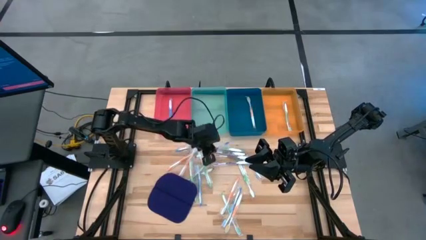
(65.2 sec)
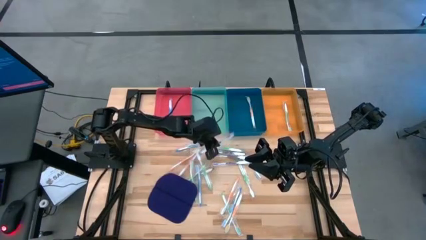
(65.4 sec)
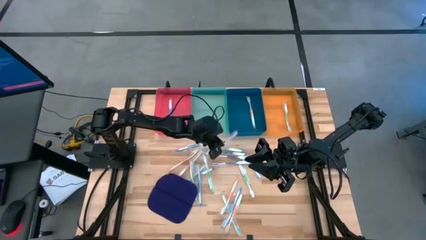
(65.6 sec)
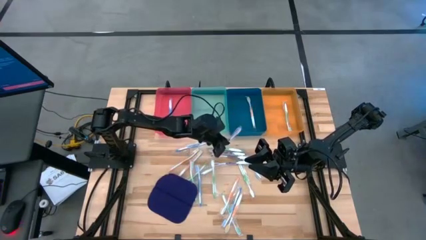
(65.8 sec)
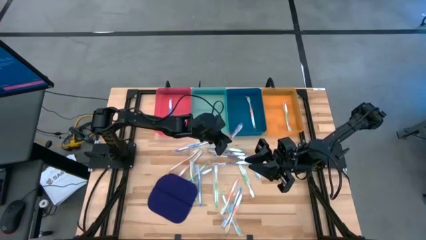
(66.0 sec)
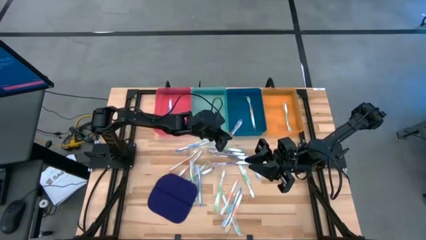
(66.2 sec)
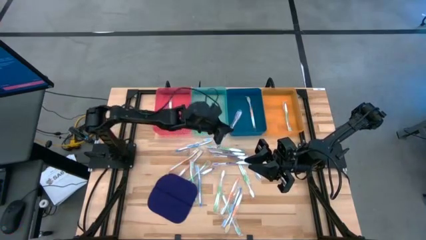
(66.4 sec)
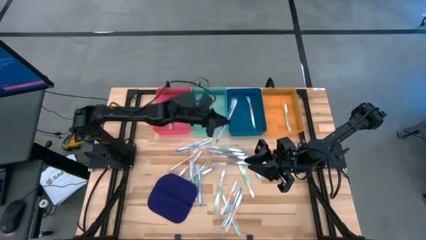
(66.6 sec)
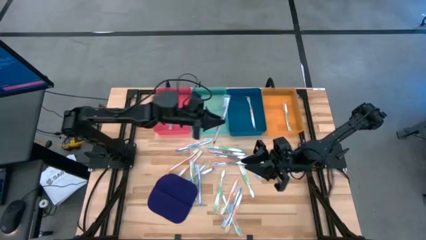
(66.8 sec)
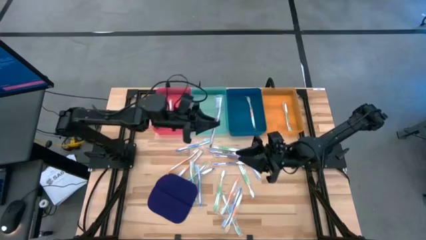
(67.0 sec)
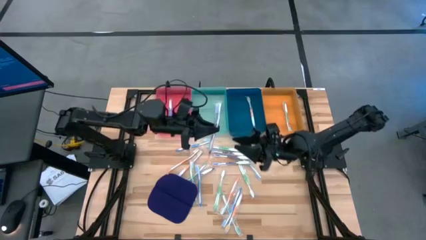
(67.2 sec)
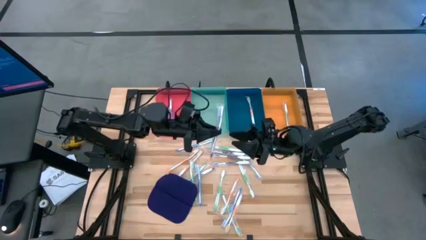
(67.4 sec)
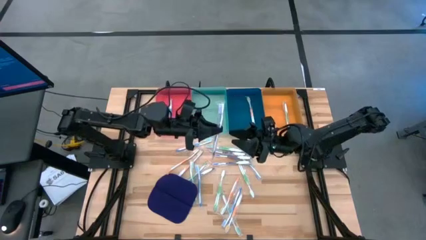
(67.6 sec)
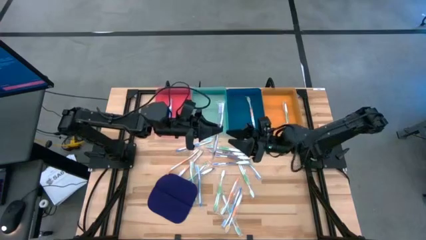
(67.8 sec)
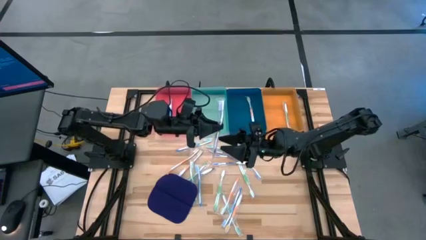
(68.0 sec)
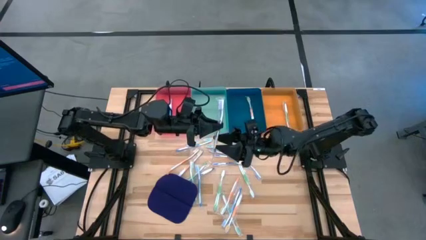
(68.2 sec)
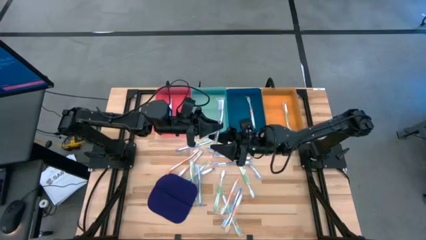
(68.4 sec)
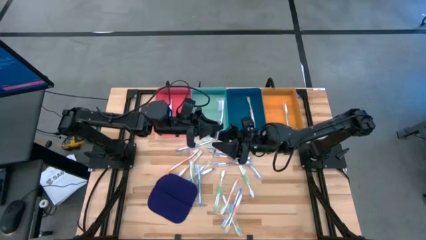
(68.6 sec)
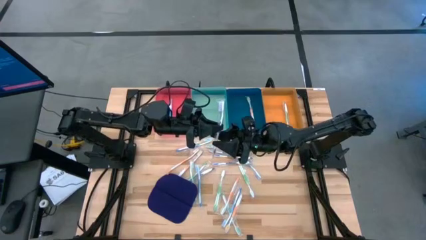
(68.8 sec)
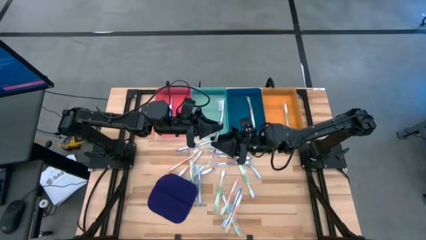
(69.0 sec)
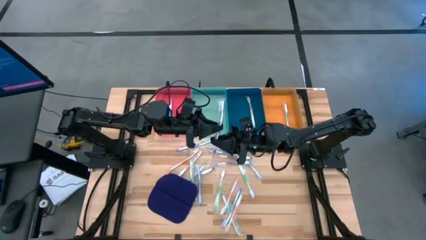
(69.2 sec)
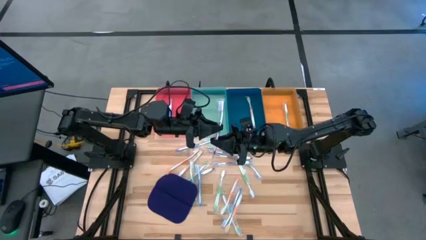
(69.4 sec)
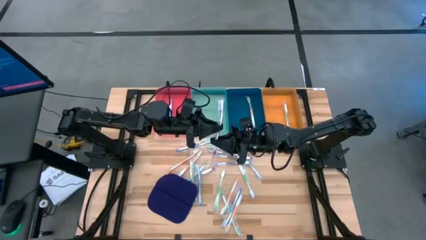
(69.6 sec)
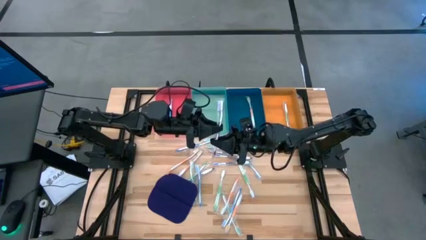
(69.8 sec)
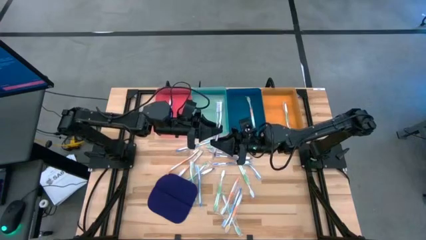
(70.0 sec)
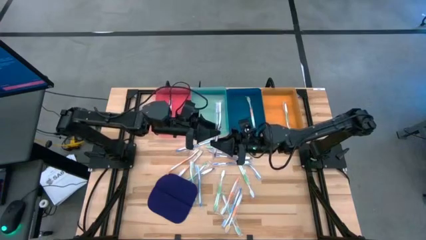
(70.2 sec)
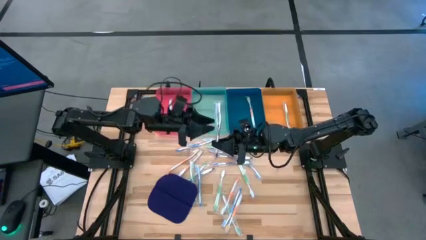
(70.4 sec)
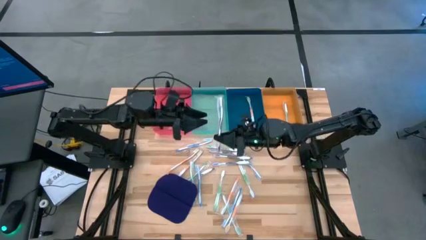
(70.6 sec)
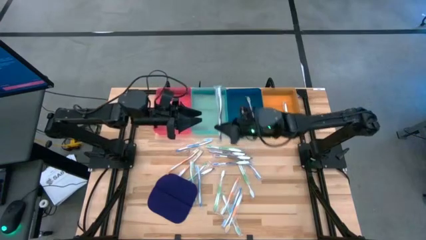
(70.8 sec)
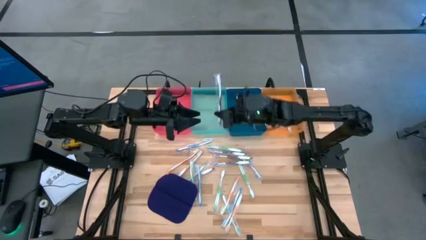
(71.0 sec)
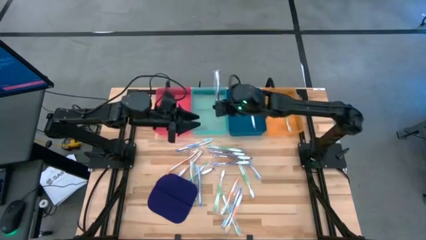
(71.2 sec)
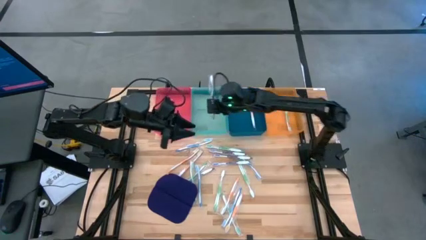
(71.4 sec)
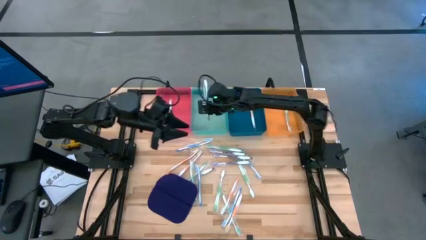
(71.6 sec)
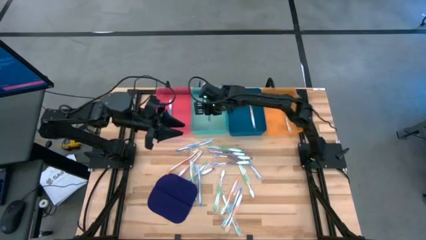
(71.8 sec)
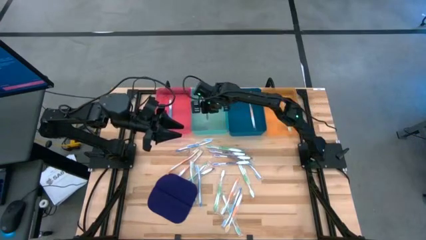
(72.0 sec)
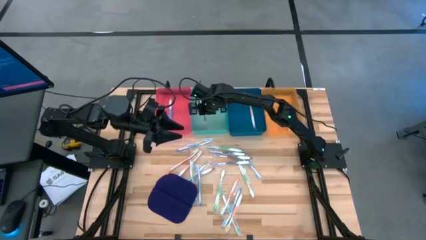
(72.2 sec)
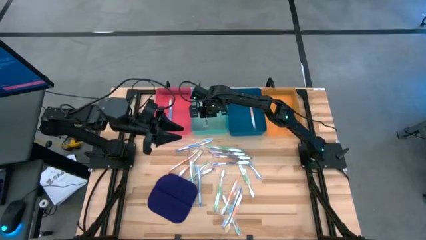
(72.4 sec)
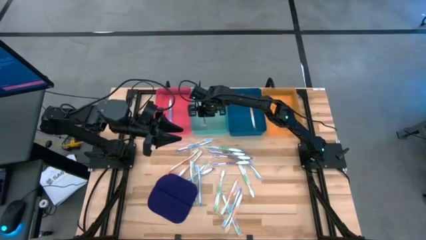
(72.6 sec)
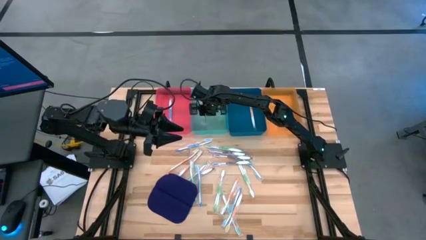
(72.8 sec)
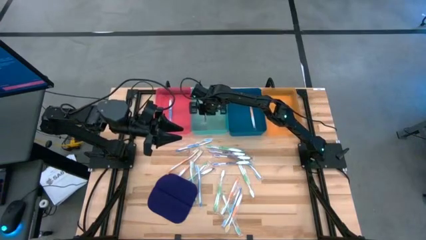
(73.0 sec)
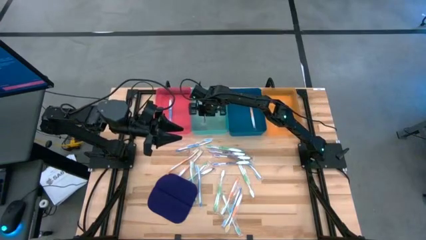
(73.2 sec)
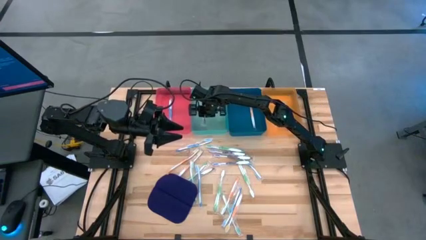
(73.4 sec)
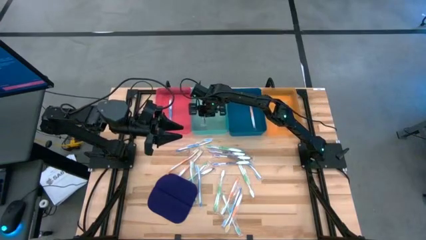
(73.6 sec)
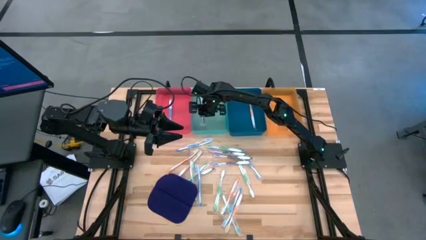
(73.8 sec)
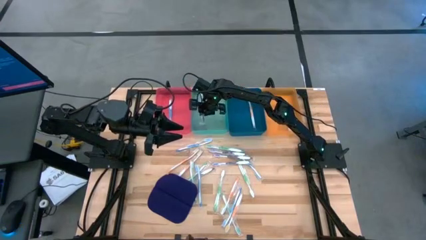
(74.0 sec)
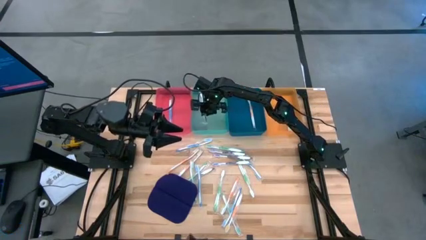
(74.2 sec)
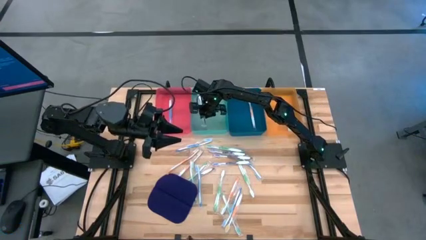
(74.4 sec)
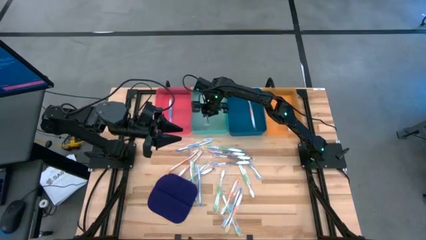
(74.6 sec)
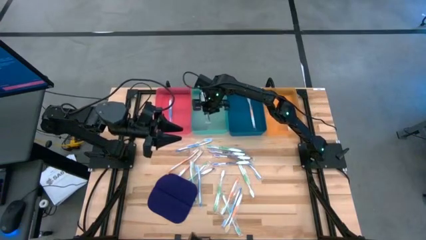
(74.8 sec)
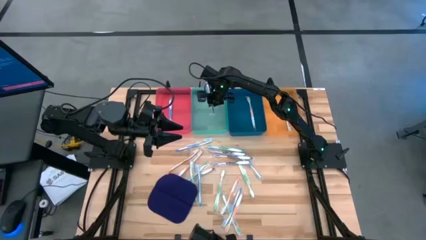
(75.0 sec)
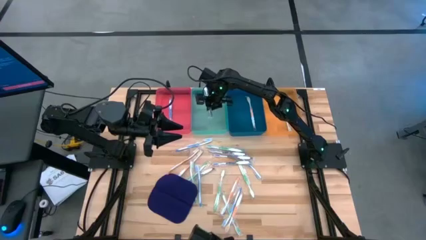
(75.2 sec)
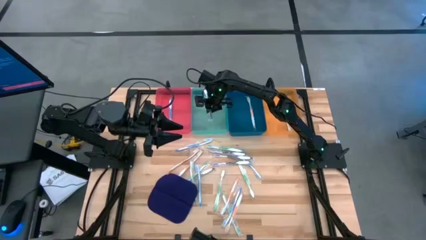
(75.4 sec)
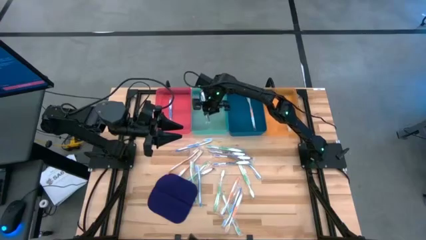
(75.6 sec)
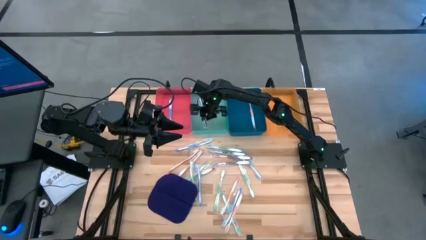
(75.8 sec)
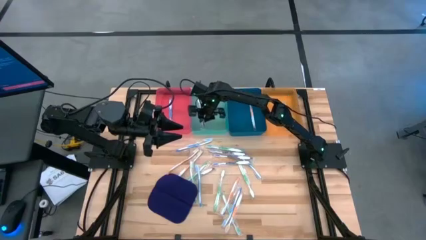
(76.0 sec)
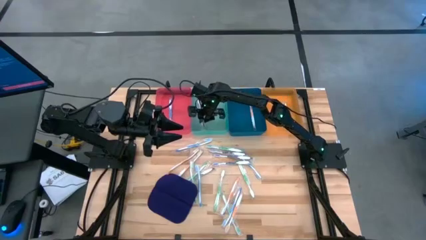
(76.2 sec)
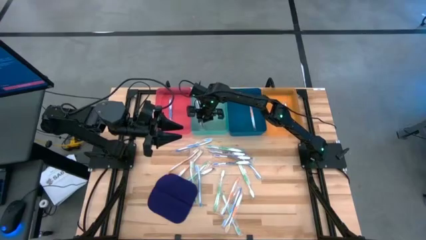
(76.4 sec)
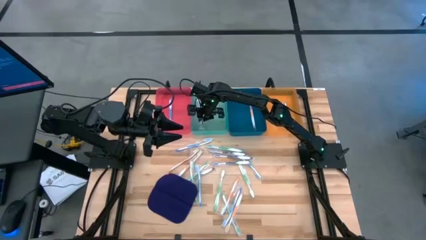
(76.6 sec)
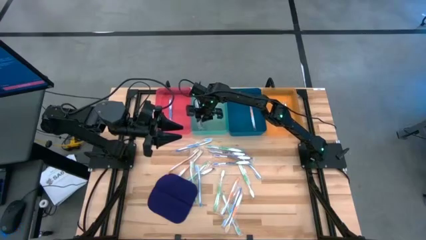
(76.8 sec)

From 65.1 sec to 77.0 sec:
Task: Pick & Place Toothbrushes
Put the purple toothbrush into the green bin

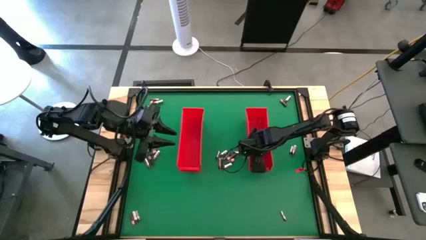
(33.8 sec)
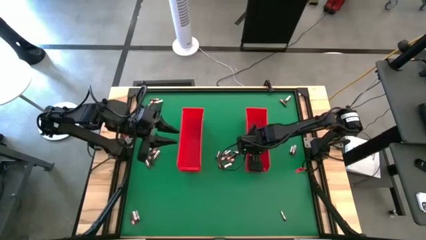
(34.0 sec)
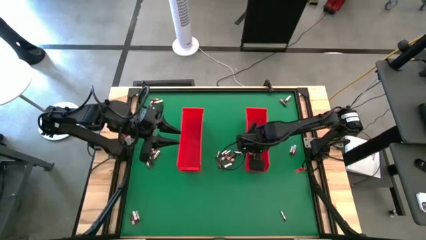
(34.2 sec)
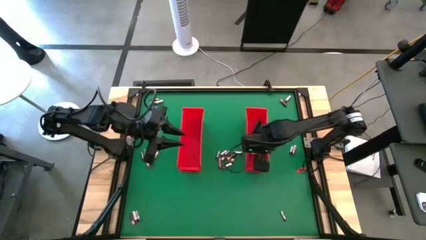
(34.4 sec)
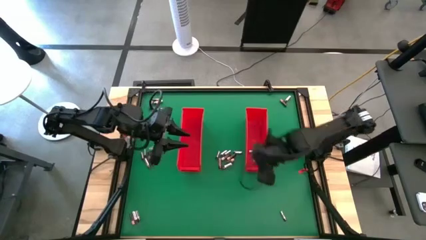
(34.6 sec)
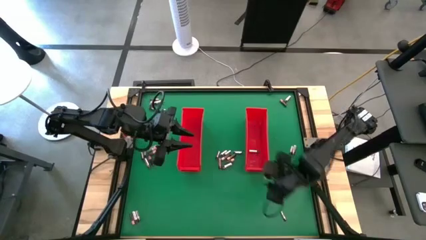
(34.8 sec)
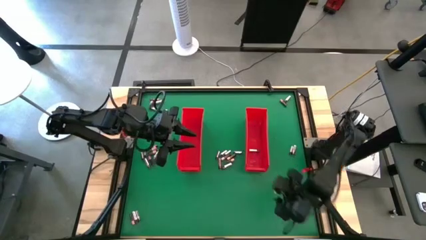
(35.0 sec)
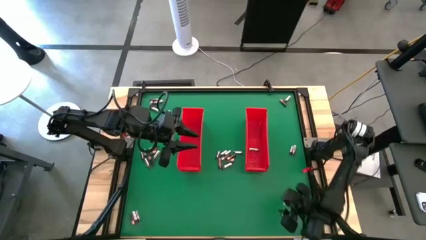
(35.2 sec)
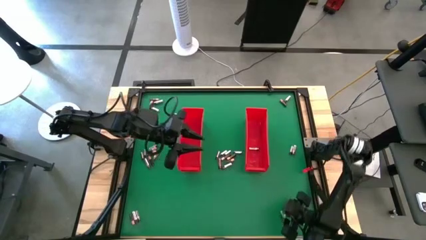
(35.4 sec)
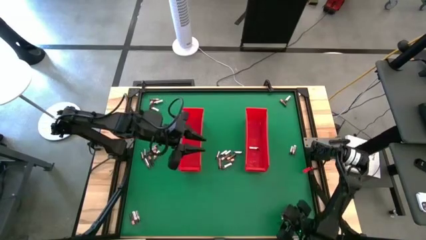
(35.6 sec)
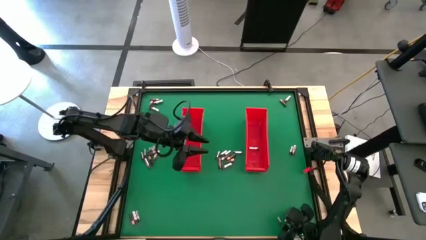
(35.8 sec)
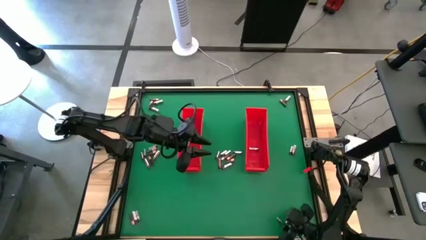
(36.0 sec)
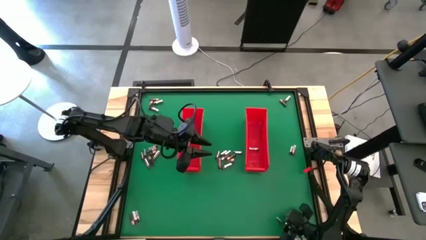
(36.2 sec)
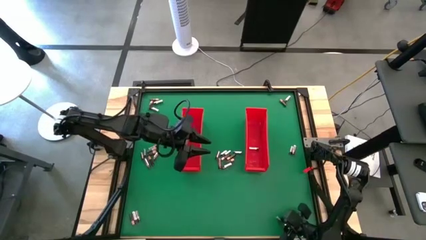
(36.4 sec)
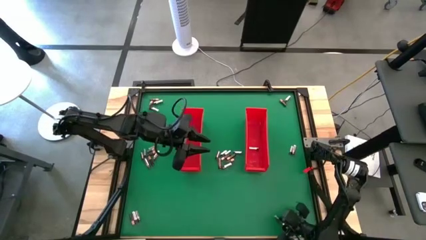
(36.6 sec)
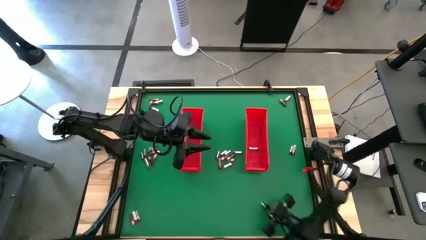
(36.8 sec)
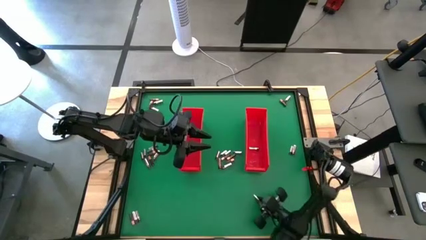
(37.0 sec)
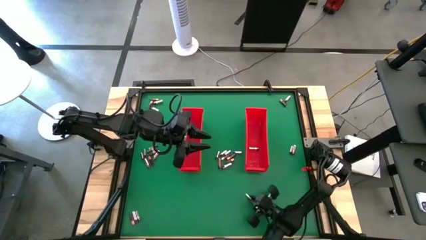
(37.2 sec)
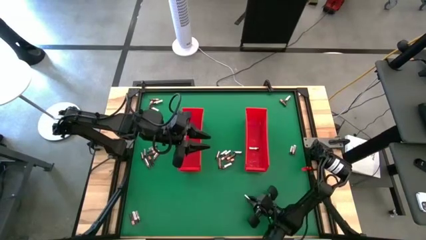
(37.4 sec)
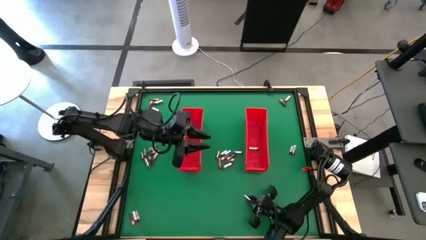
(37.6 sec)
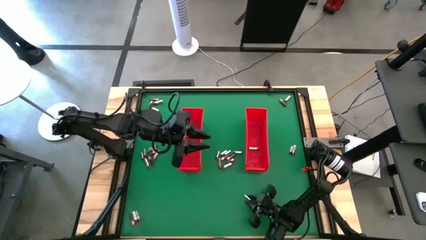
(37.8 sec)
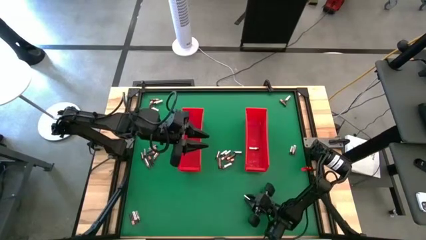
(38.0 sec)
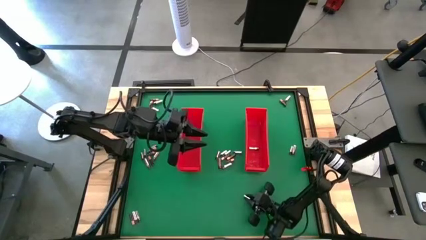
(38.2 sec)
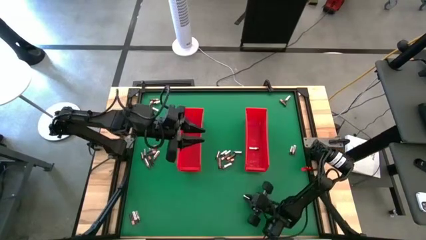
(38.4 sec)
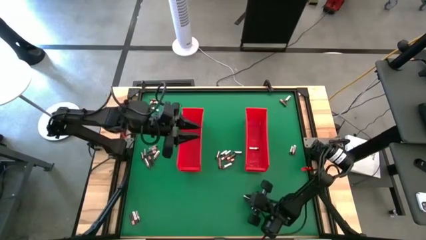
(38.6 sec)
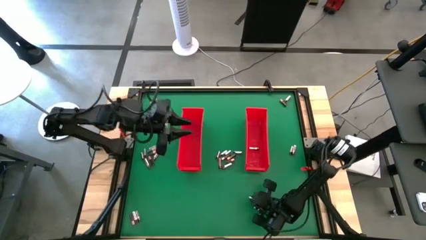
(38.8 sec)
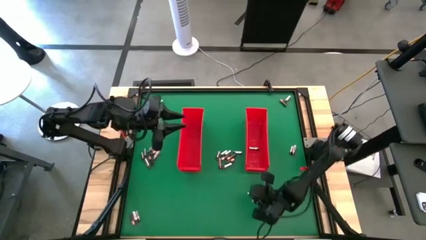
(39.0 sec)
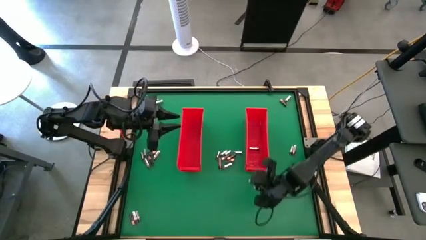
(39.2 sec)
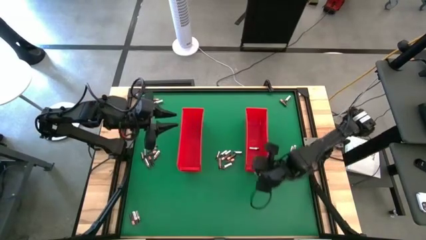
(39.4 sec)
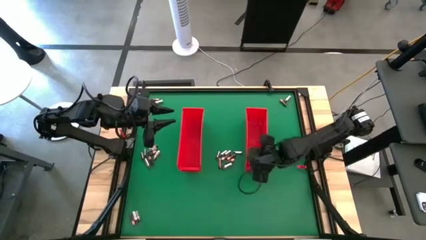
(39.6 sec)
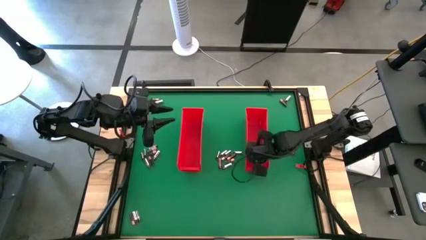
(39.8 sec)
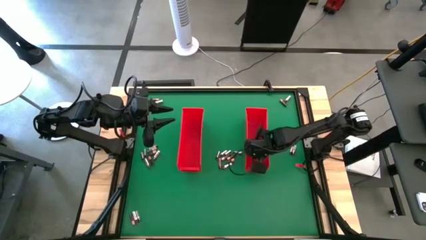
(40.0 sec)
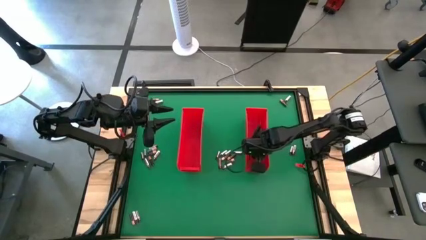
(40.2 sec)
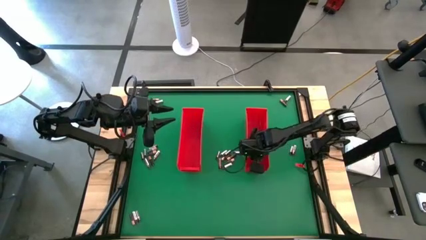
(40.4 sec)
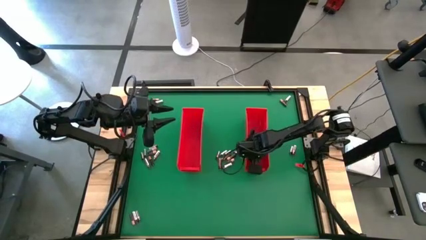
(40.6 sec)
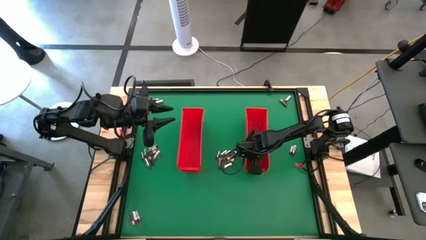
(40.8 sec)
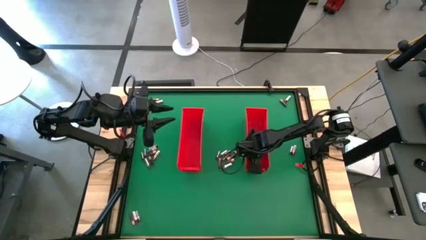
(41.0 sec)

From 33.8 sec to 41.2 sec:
Task: Sort batteries
Put the silver battery into the right red bin
